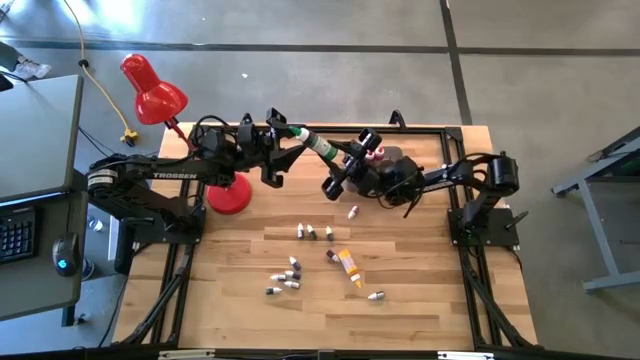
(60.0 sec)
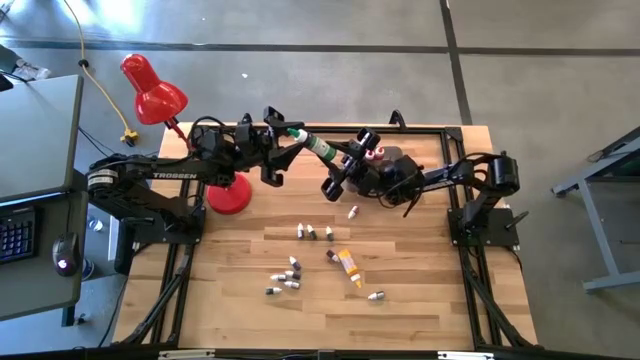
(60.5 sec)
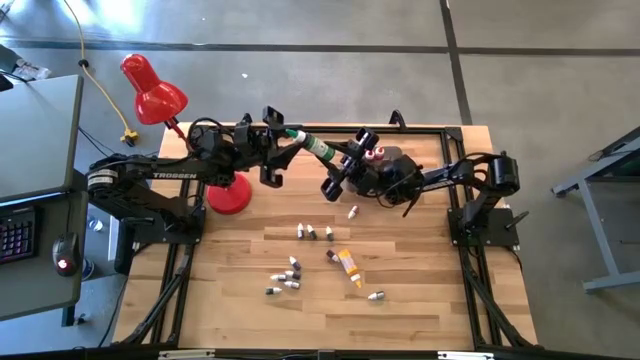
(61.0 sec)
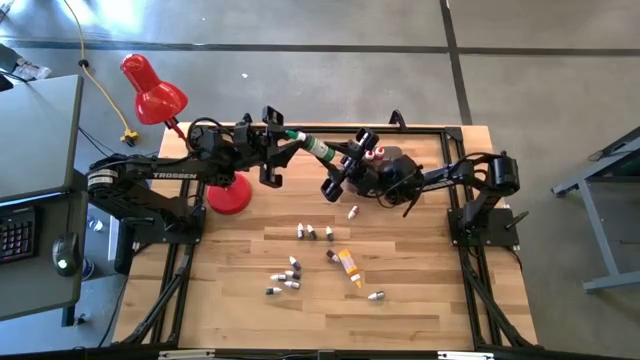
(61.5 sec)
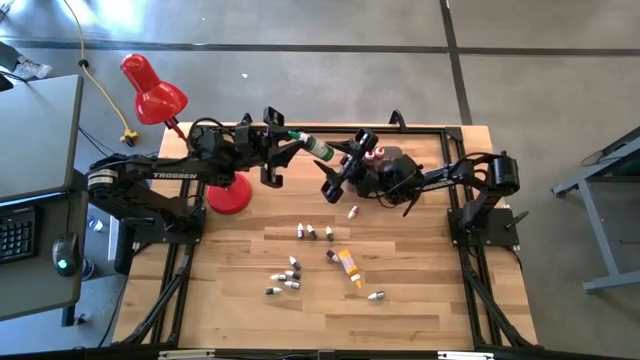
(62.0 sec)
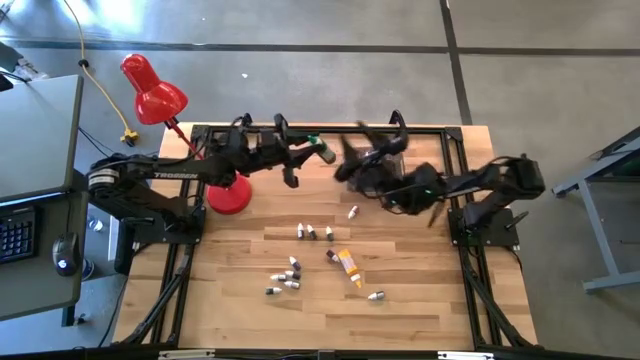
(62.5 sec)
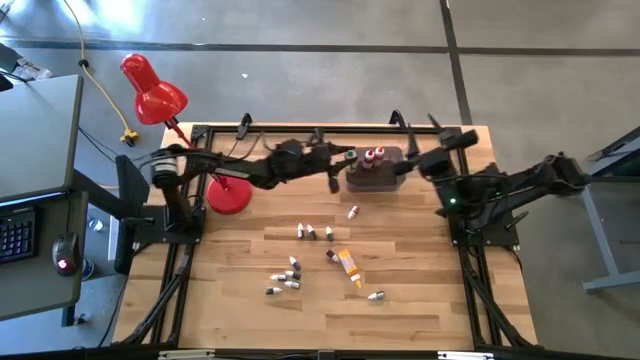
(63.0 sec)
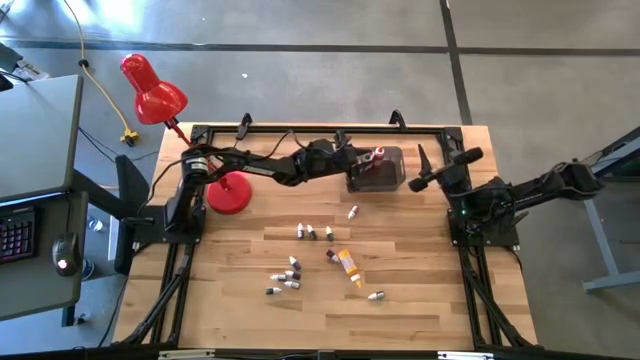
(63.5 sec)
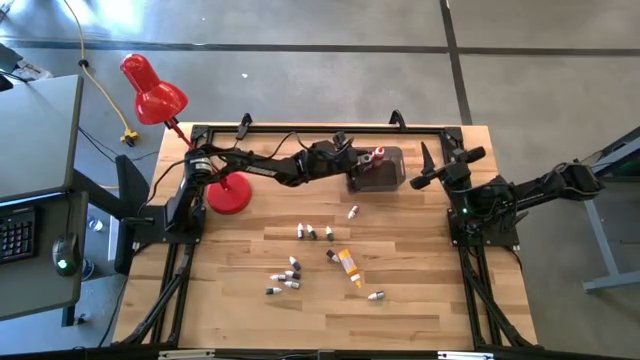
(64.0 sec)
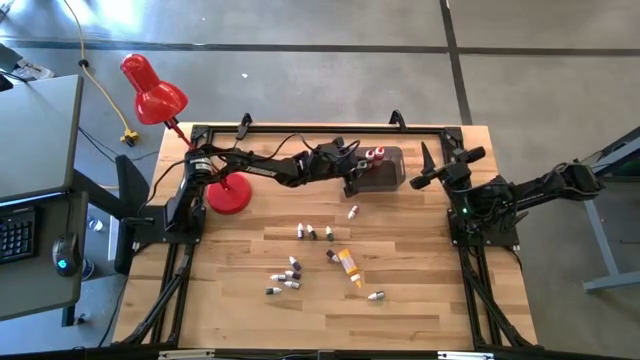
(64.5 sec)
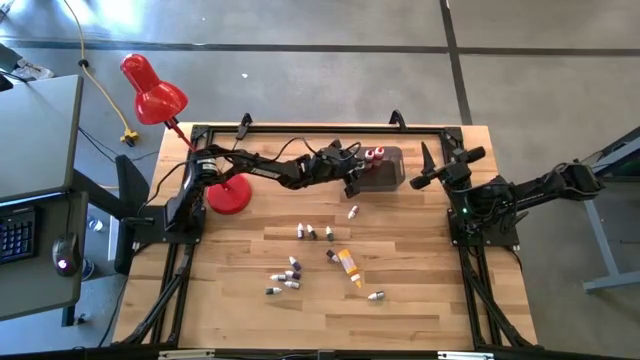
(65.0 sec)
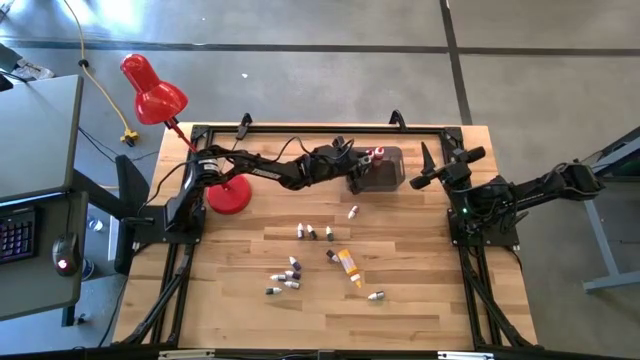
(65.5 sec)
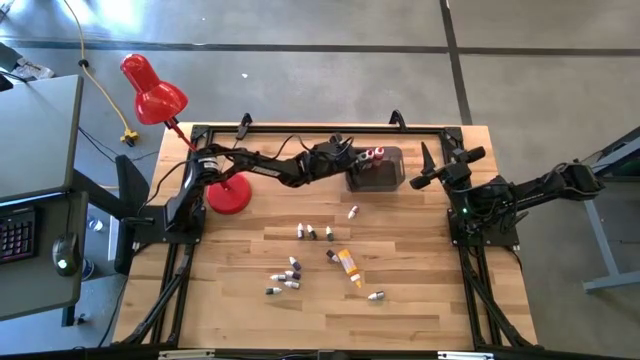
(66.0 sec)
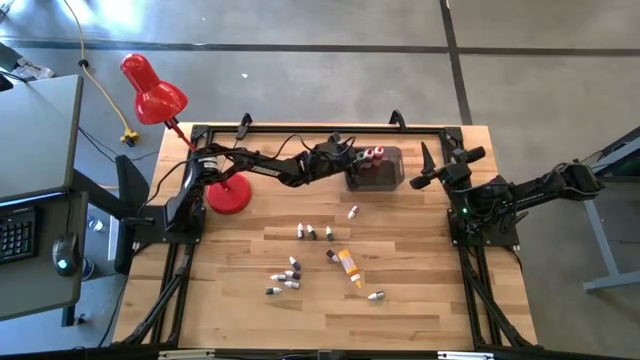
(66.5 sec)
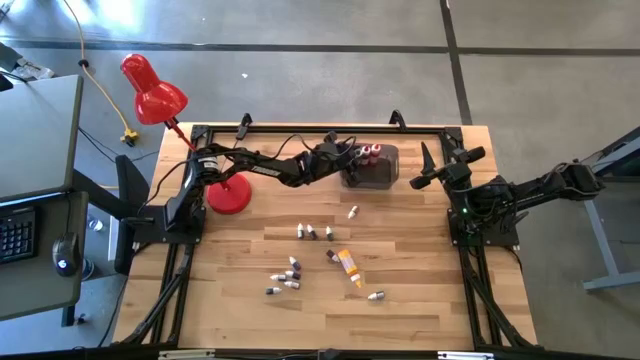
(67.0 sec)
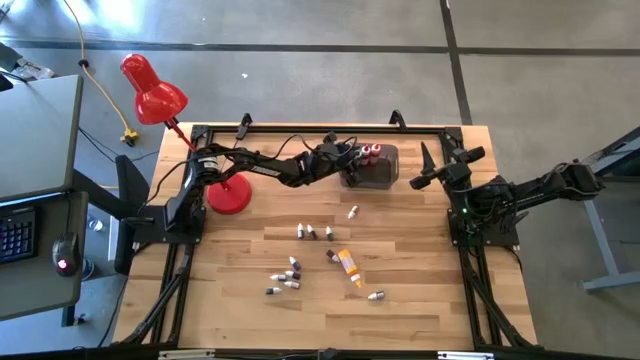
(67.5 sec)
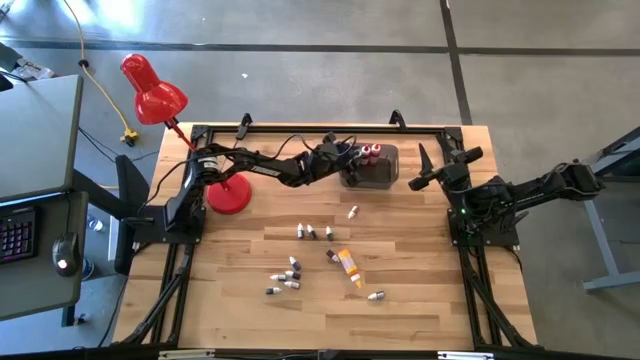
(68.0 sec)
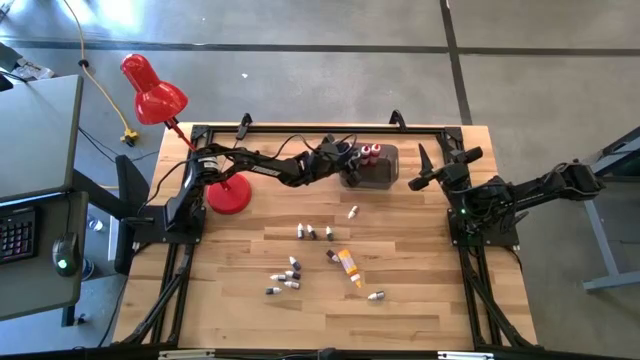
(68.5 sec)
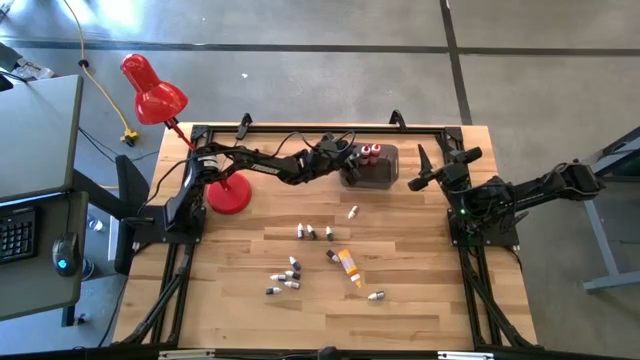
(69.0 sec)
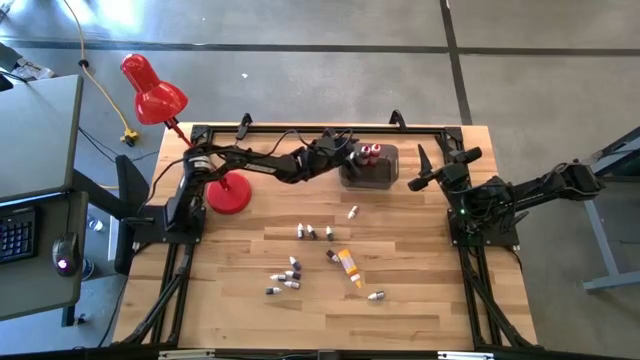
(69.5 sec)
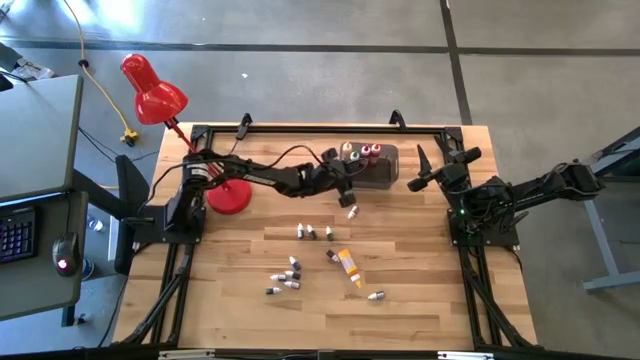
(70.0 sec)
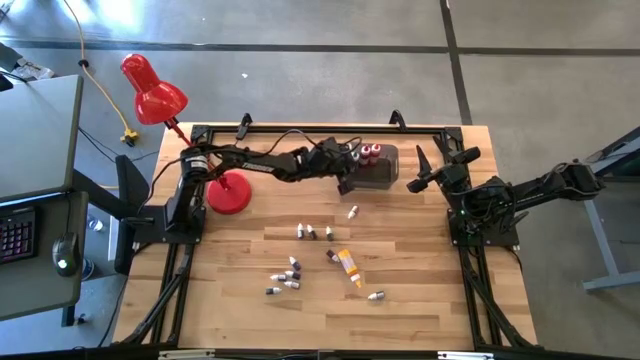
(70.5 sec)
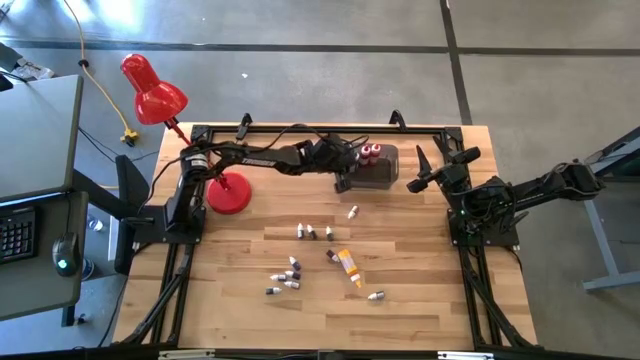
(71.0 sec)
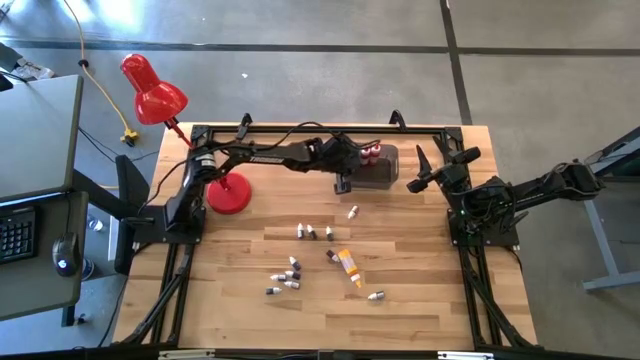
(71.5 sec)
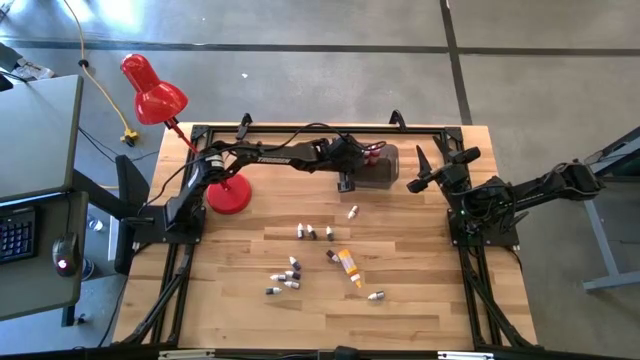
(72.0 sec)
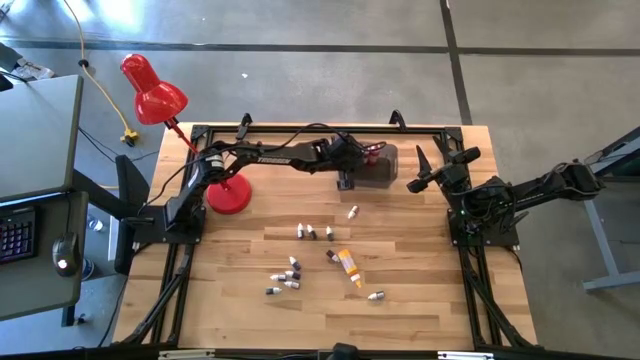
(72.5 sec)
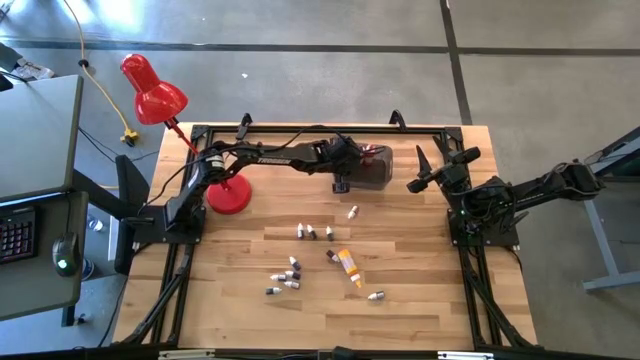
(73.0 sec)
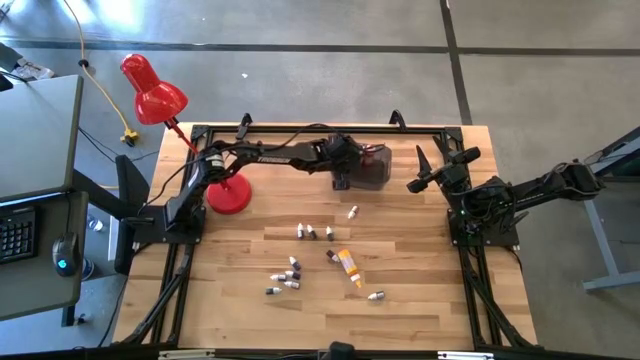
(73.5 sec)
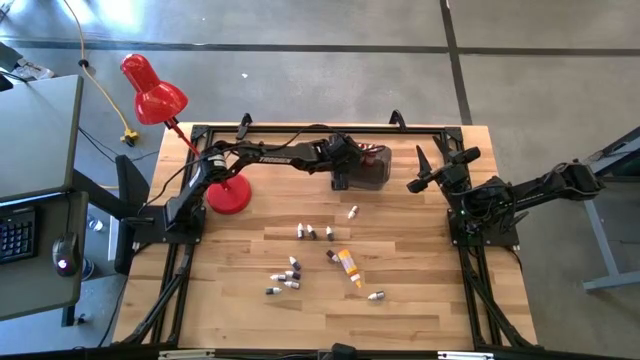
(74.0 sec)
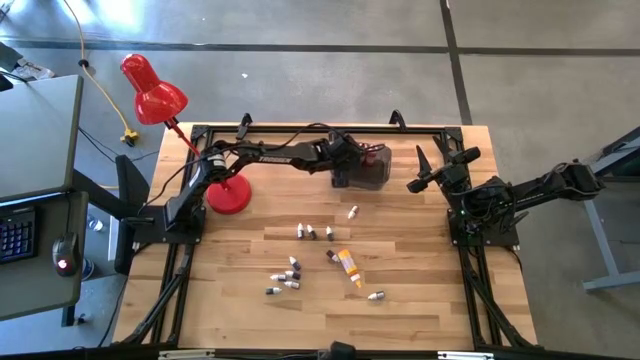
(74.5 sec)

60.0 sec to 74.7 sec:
Task: Pick & Place food coloring
Put the large green food coloring bottle into the bin

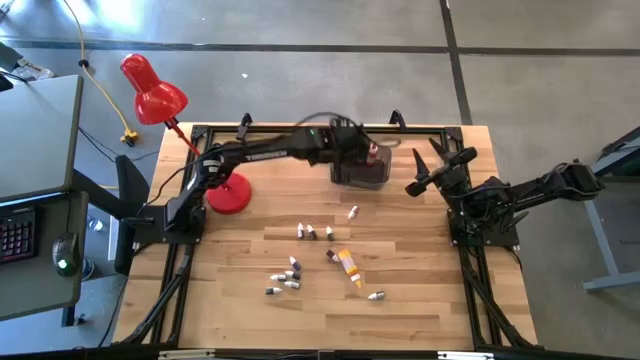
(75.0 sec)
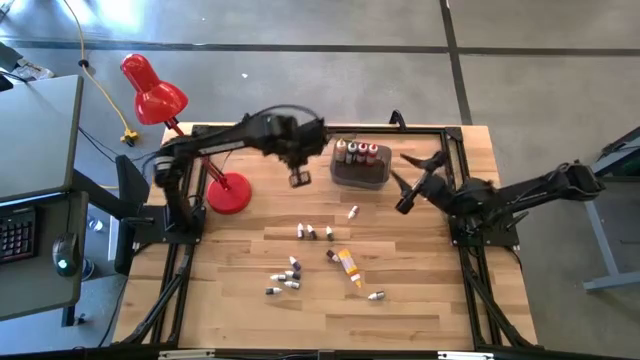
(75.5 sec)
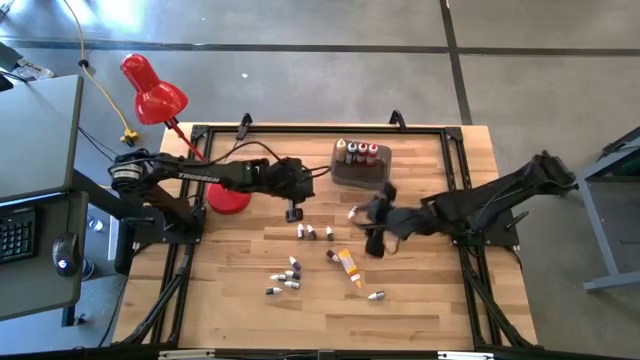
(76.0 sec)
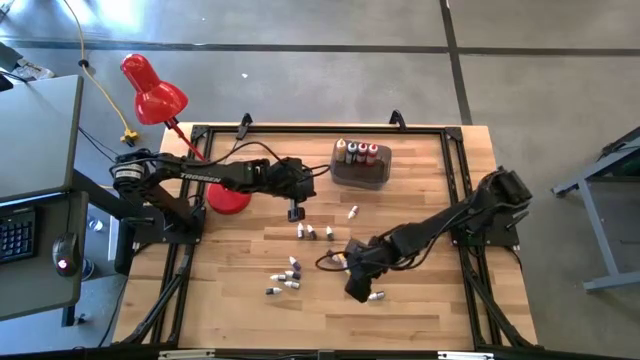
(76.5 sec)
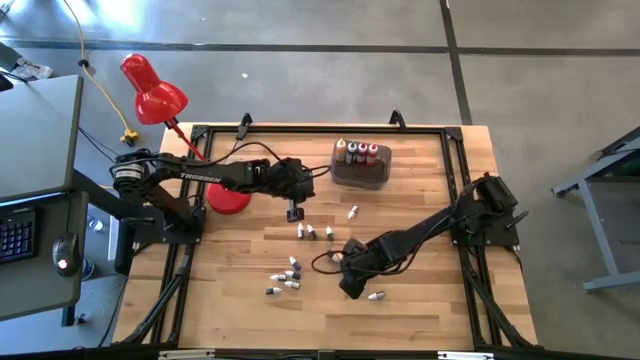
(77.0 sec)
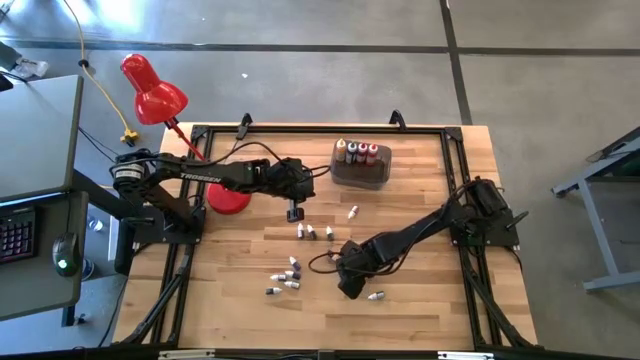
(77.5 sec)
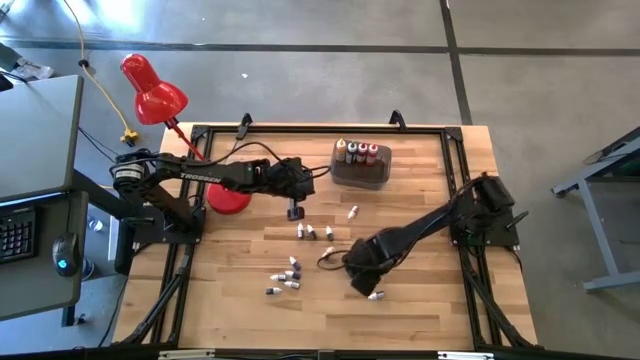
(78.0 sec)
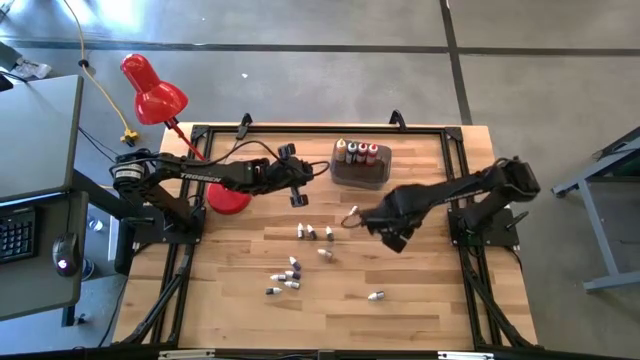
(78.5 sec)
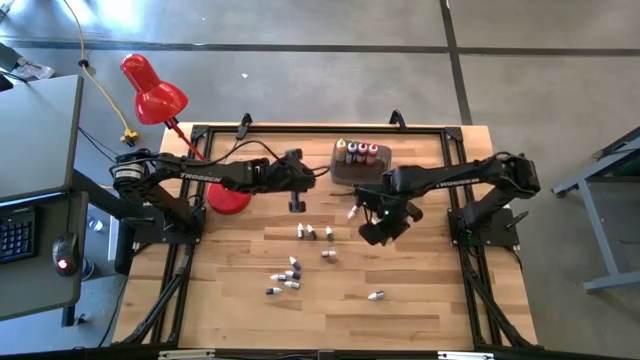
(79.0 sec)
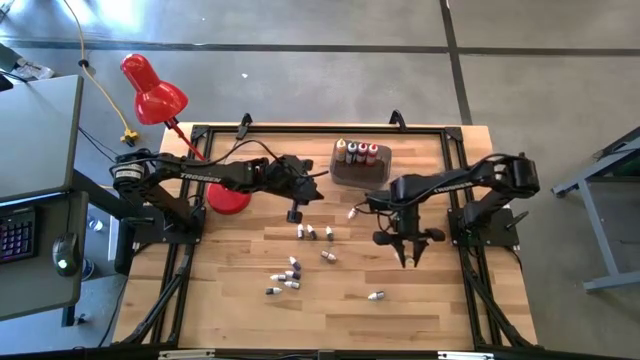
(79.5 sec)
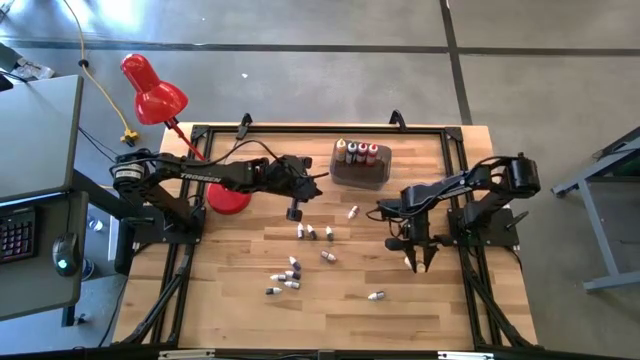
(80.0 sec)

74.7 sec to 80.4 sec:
Put the large yellow food coloring bottle into the bin

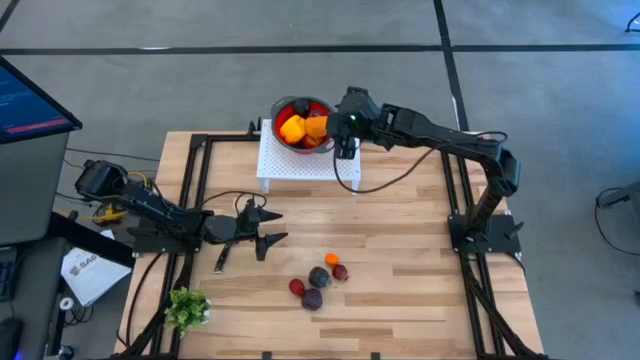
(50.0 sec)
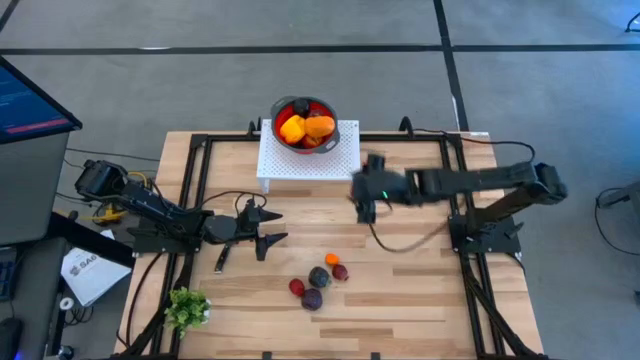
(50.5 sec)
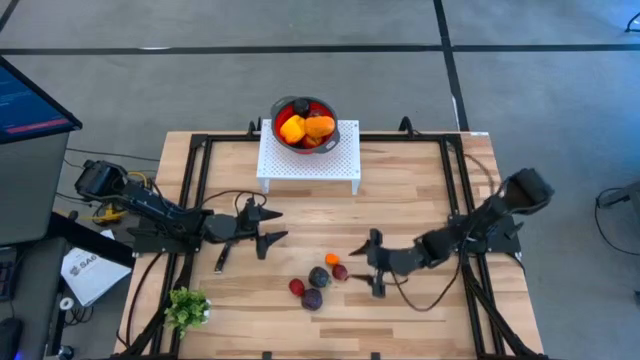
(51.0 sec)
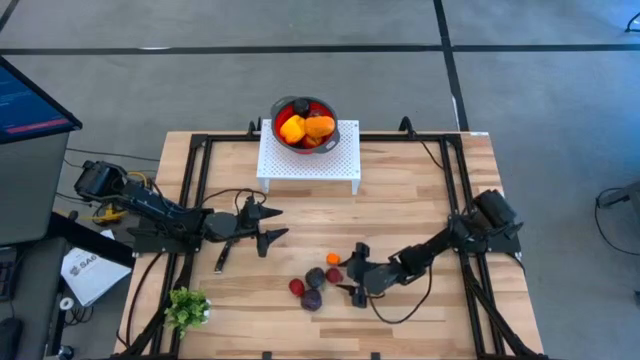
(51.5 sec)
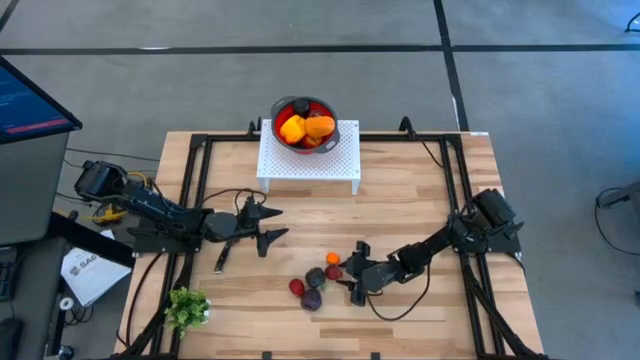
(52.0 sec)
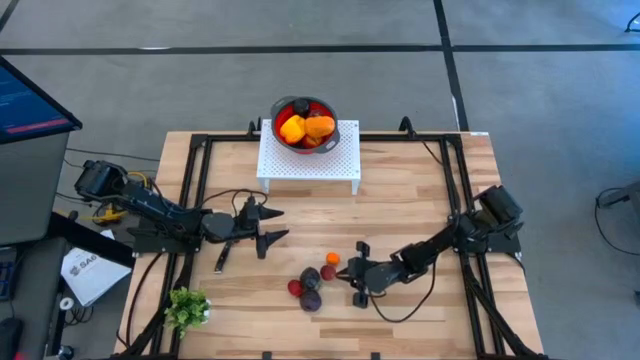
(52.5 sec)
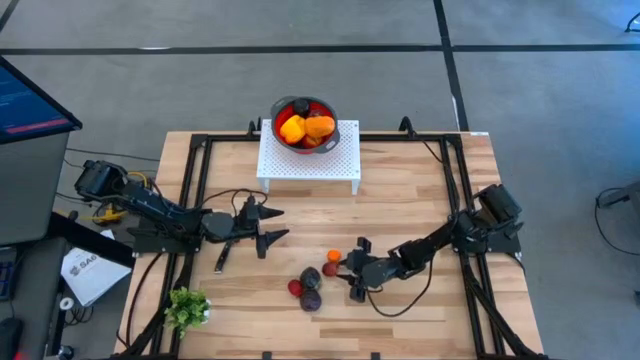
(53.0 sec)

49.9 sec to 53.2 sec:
Task: Pick & Place Fruit
Put the right red pomegranate into the red strainer bowl on the shelf
